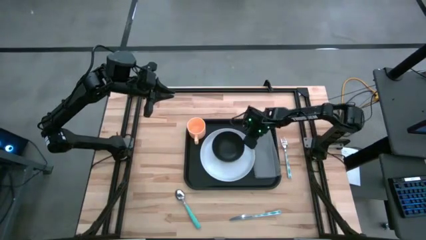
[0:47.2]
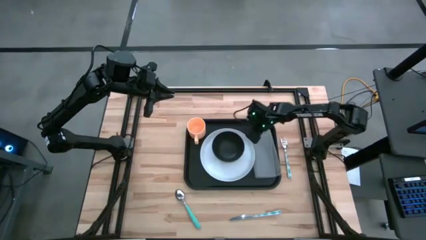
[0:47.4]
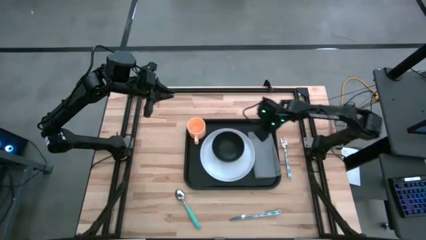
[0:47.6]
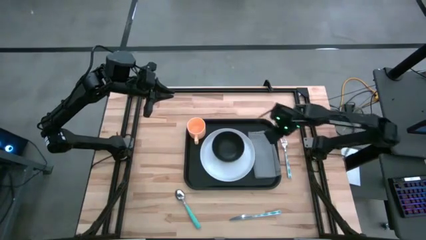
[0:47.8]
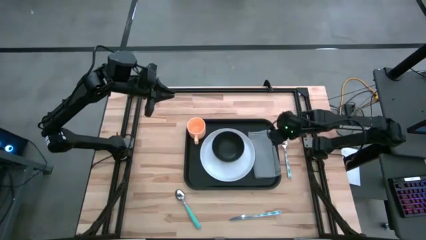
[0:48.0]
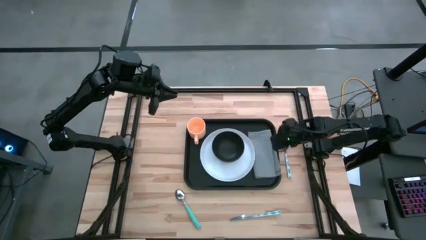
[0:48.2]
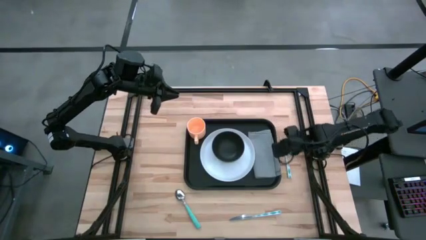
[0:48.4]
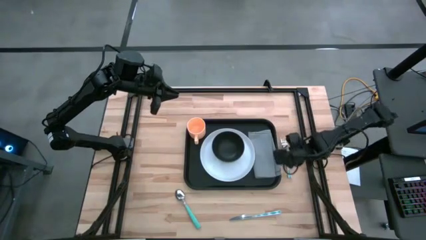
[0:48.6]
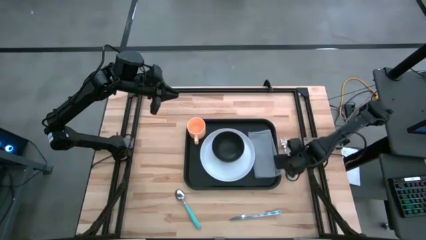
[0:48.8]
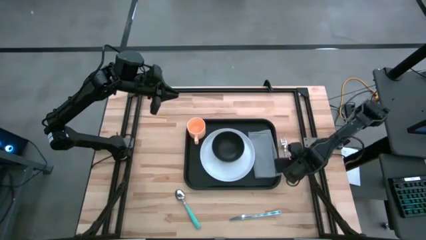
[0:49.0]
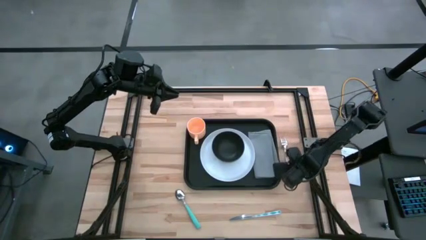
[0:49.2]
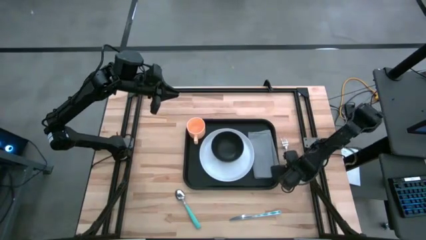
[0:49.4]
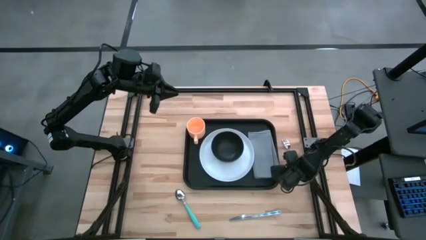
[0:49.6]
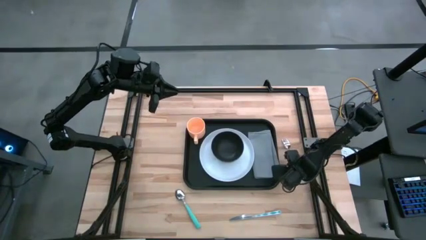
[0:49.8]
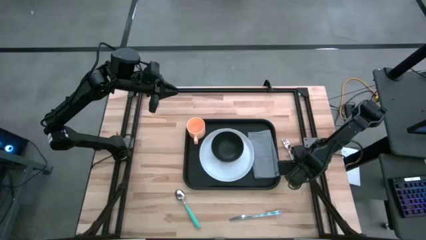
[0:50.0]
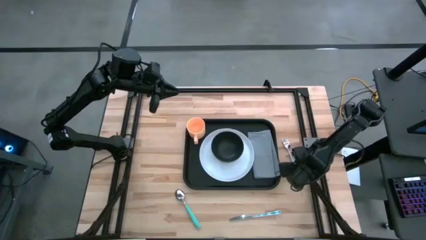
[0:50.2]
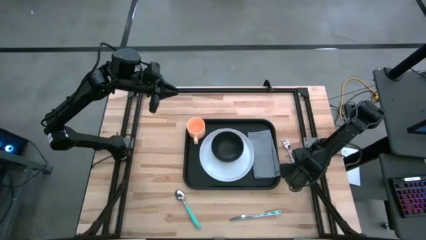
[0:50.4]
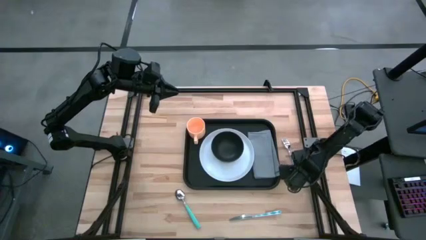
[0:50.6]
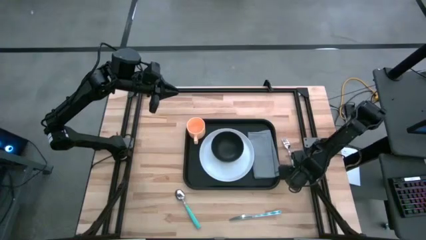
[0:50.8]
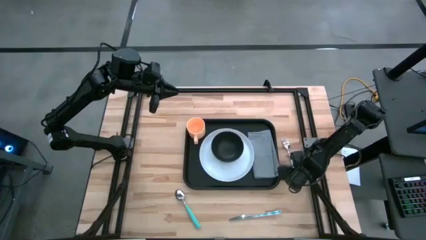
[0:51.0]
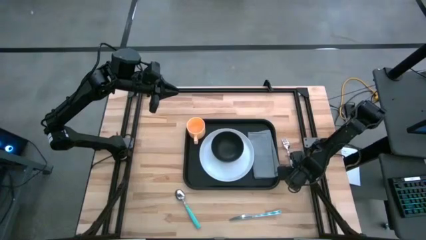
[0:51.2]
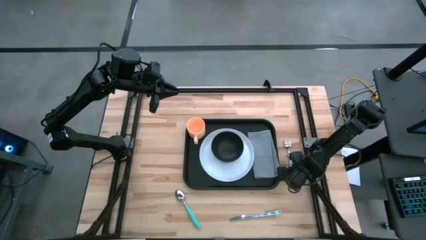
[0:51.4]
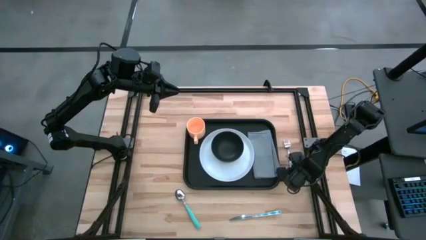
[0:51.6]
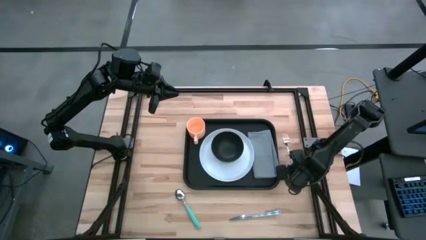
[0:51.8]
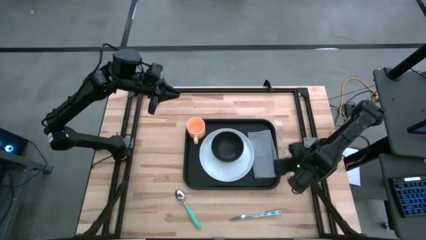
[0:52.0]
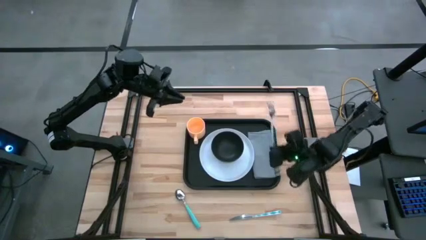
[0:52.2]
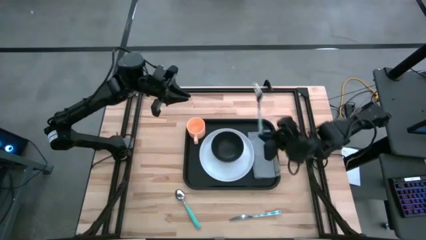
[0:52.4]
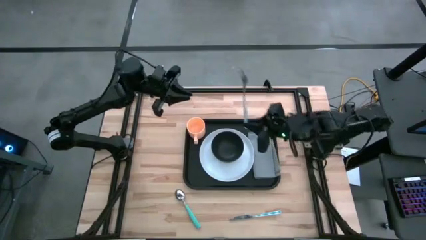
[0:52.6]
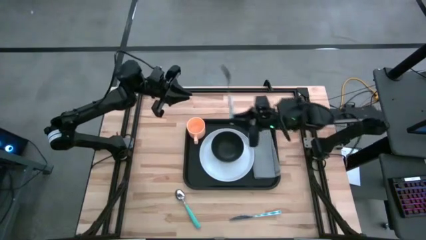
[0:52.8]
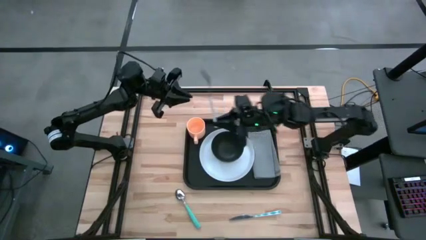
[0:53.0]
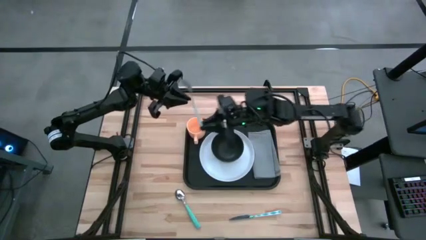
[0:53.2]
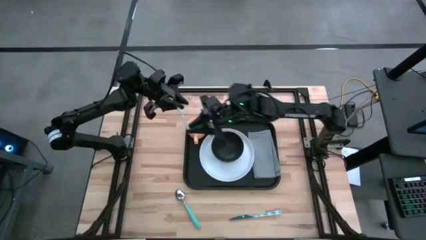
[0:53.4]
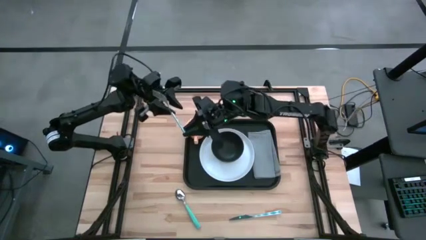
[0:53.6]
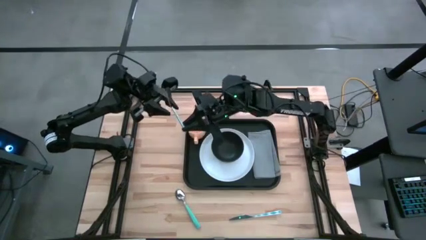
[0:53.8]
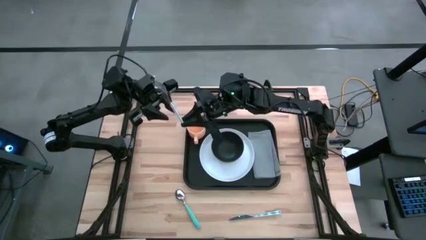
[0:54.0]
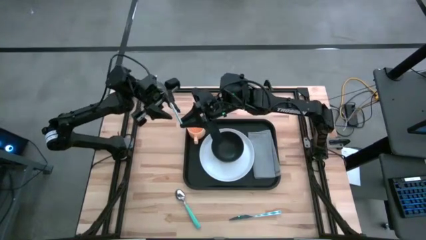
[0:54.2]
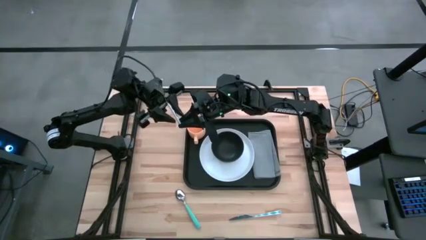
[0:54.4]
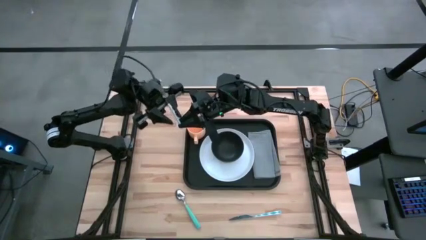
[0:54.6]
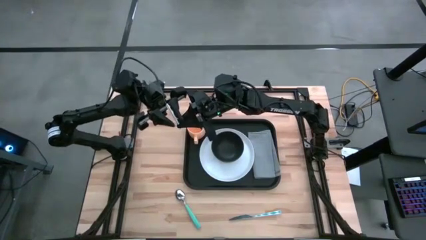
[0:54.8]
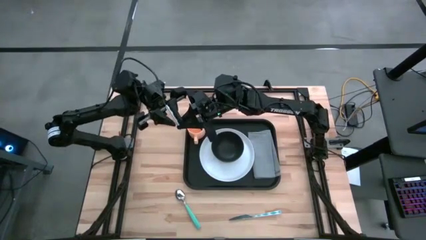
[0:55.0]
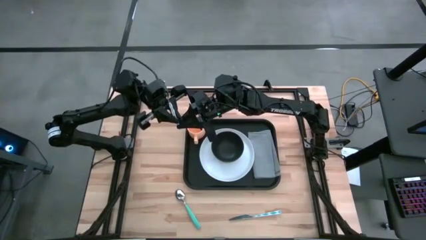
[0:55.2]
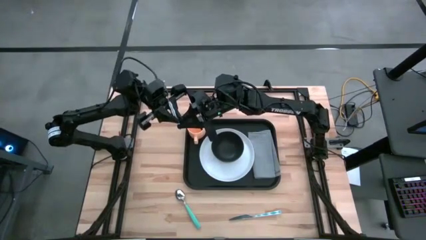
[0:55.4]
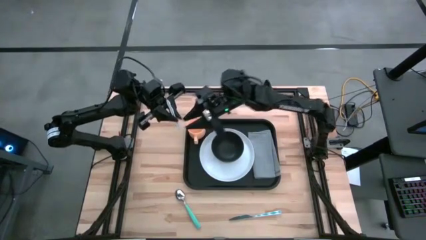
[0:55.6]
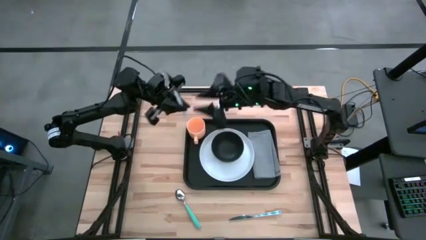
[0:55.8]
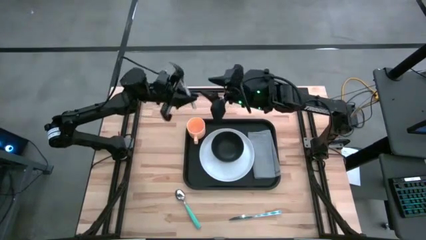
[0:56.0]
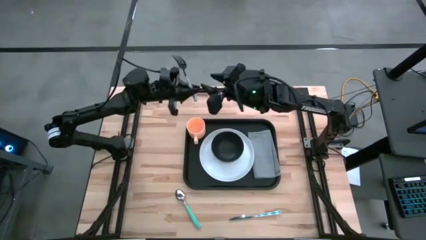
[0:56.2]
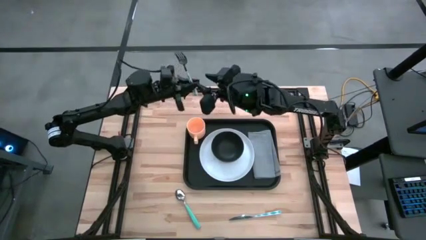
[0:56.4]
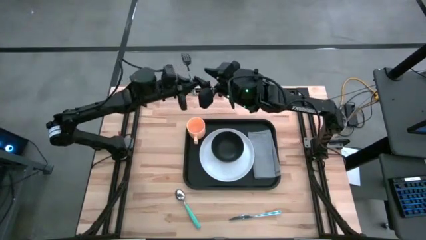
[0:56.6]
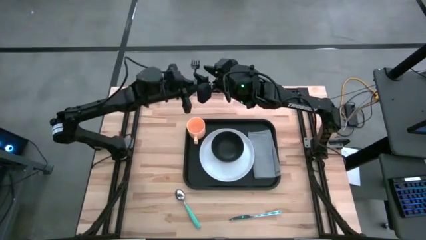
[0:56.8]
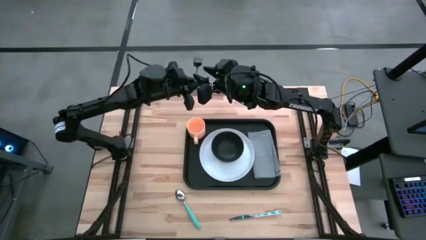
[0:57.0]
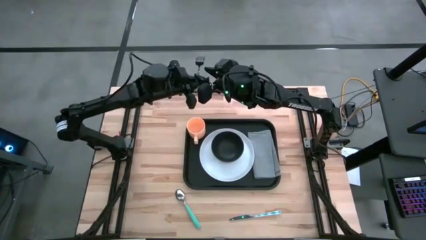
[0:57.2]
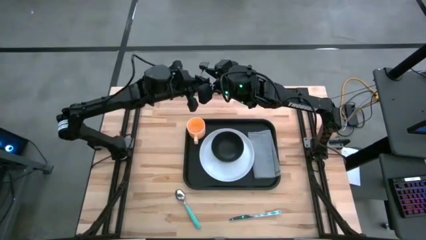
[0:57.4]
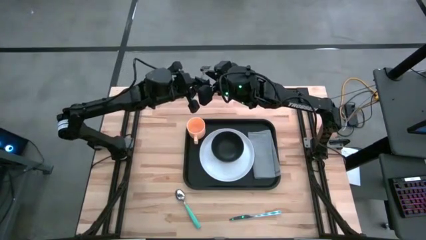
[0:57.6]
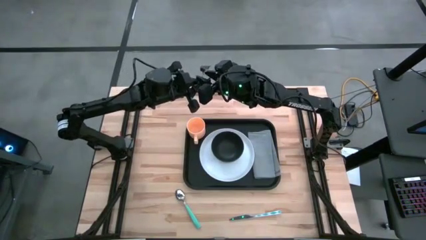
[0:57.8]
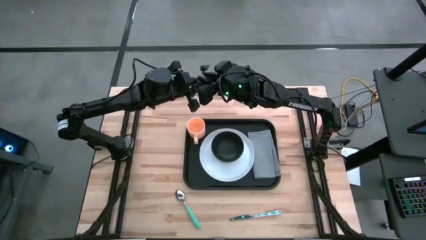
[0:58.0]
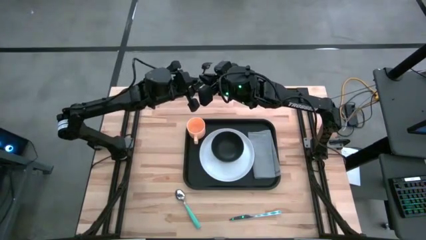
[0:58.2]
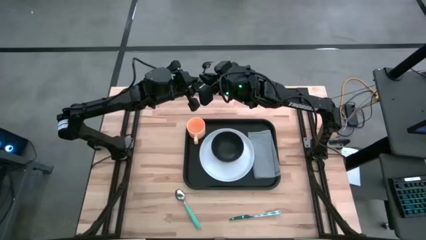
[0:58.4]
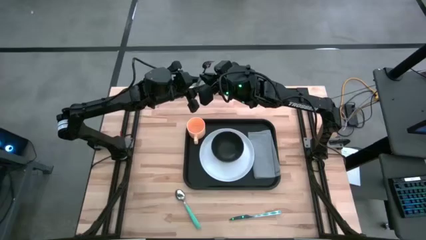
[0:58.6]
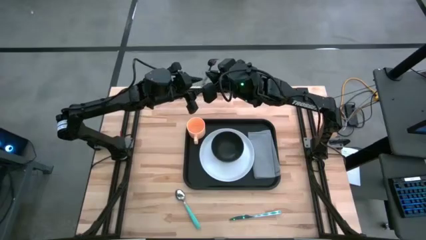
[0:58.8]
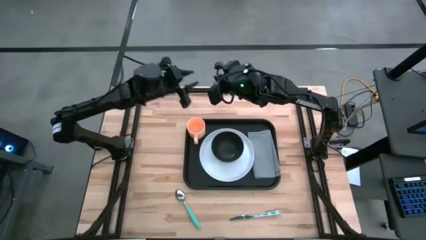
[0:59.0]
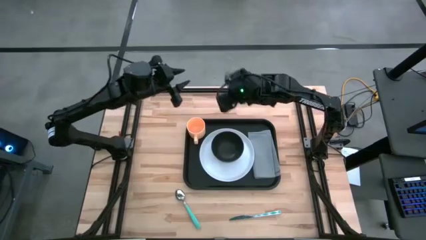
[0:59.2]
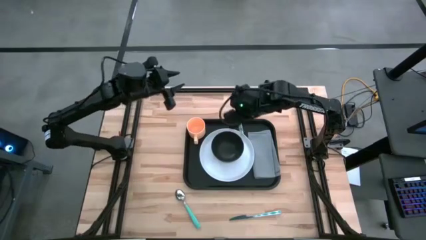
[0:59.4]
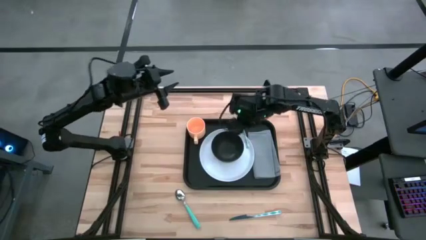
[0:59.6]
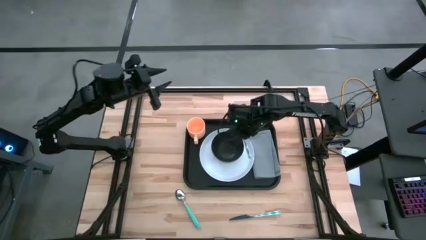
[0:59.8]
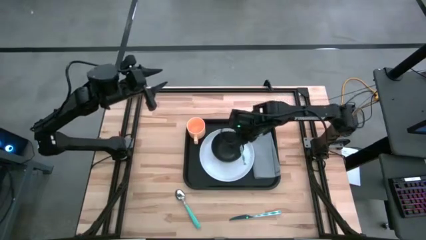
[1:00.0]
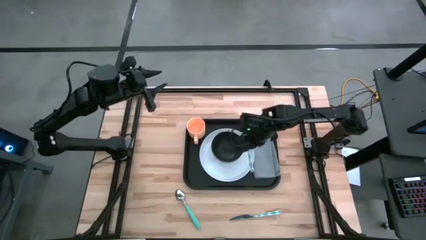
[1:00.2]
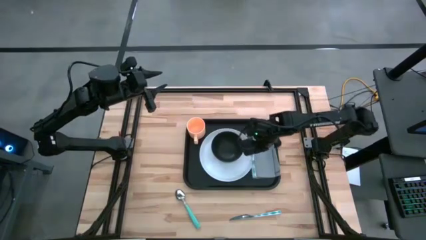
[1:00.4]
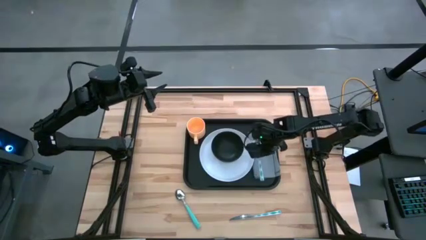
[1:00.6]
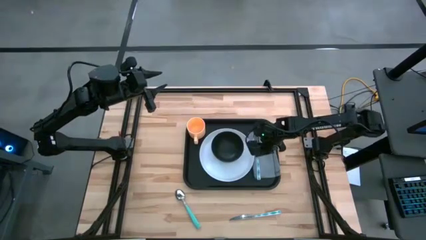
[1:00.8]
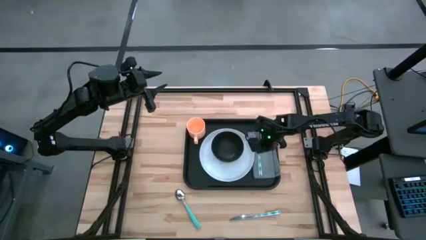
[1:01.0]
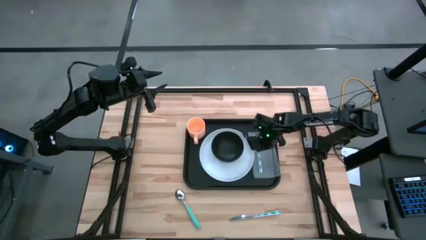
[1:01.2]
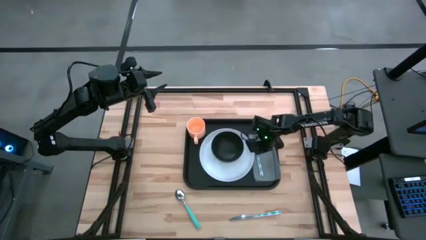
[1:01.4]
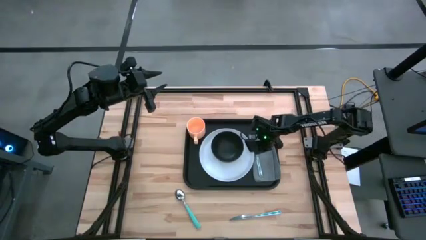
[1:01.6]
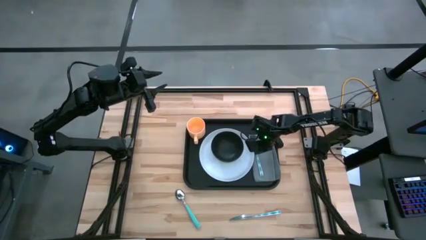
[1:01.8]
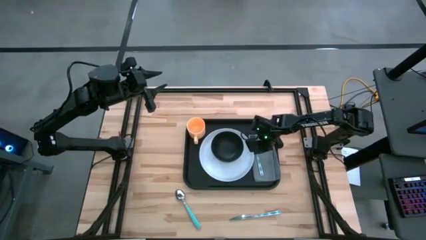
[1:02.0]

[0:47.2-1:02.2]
Task: Set up tray
Put the green fork on the gray napkin on the black tray

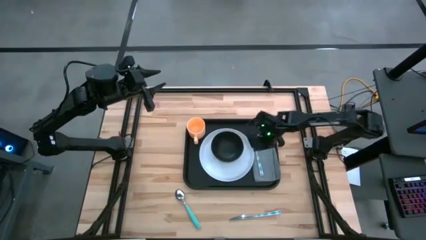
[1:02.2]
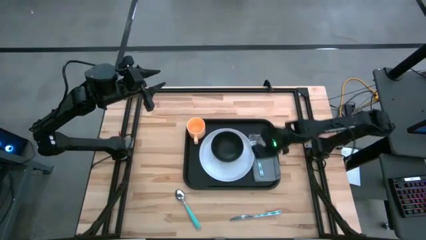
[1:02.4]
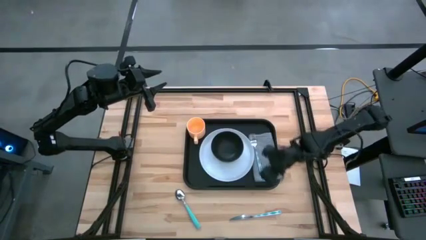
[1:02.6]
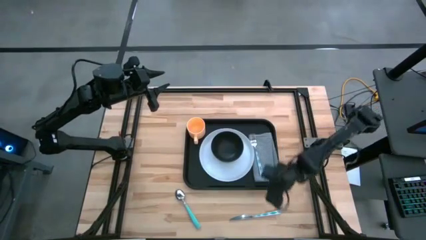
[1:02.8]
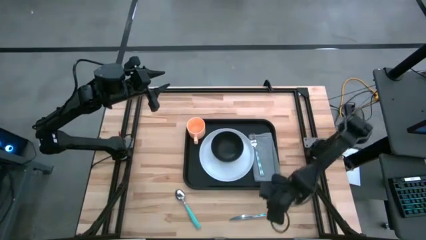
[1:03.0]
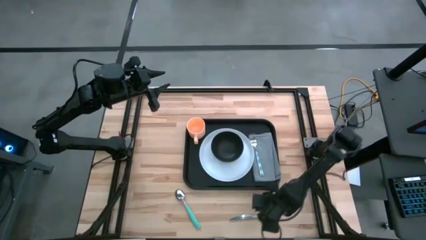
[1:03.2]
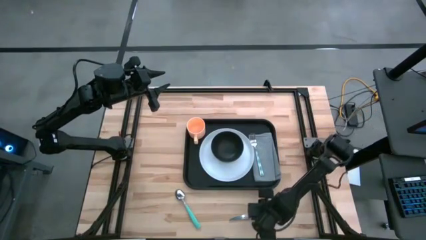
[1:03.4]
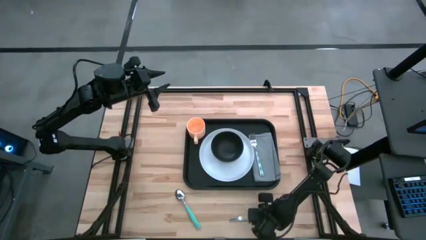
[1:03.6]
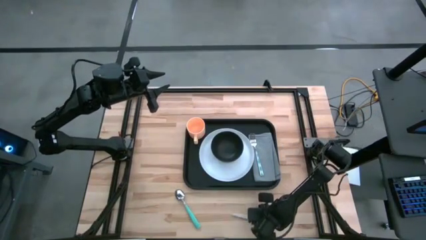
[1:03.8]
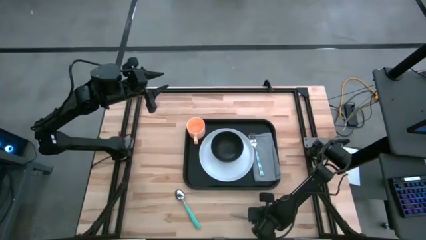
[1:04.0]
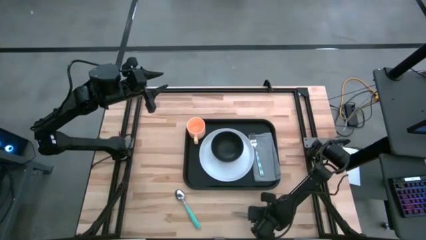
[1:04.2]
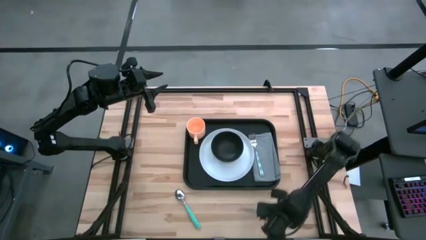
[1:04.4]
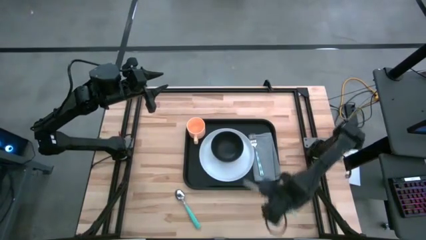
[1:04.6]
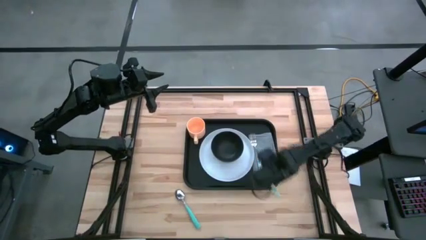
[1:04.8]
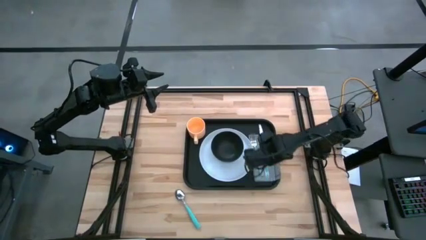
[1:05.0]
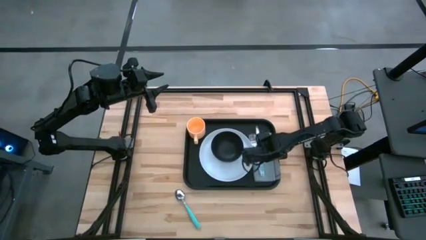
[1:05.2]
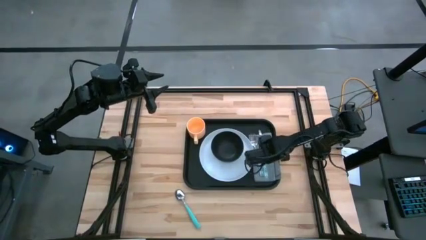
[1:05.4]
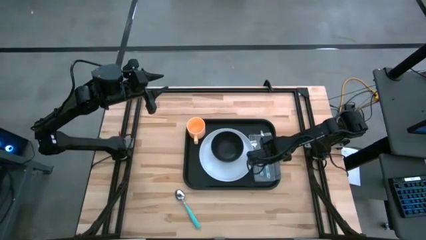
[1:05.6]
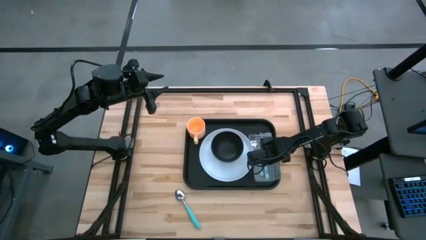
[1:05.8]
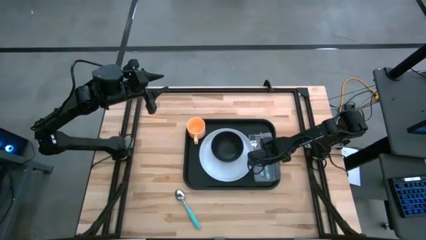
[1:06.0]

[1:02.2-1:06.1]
Put the green knife on the gray napkin to the right of the green fork
